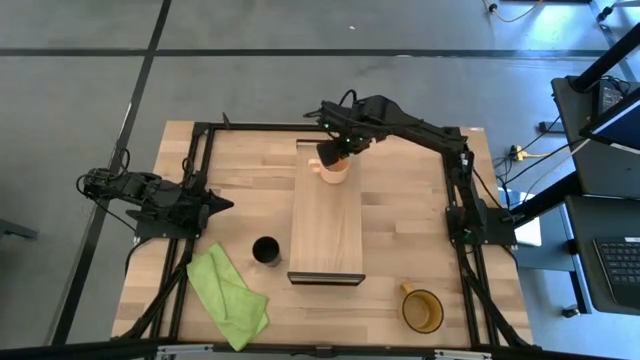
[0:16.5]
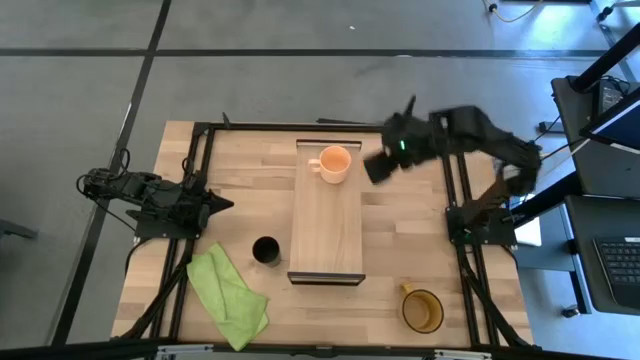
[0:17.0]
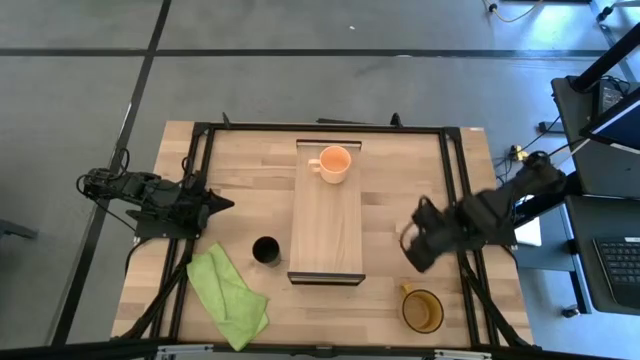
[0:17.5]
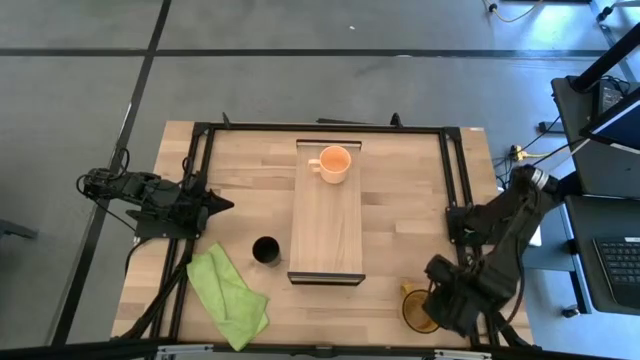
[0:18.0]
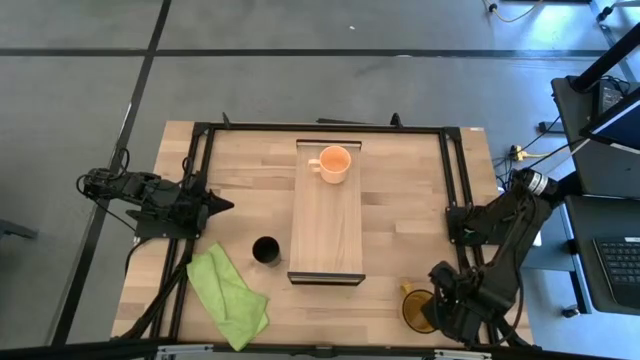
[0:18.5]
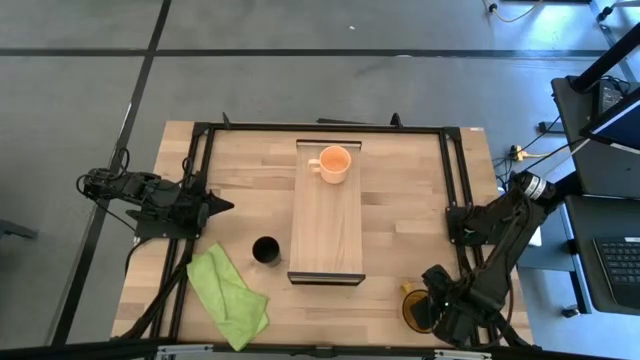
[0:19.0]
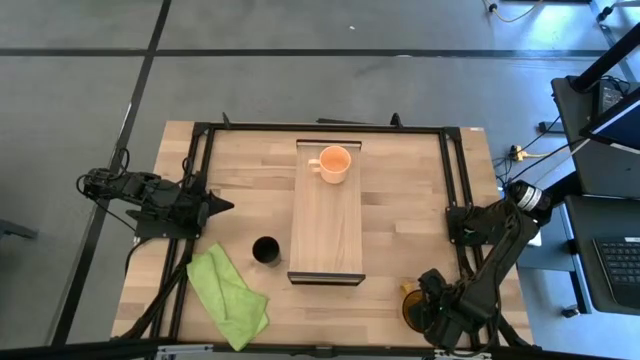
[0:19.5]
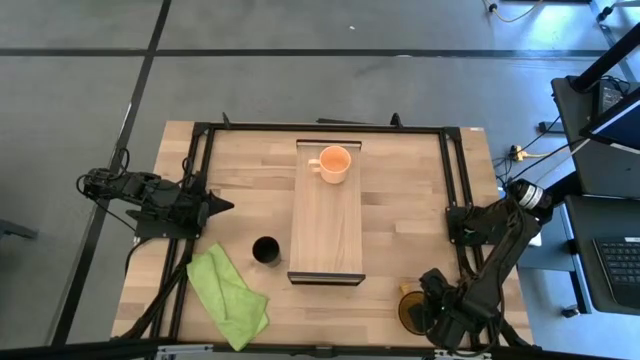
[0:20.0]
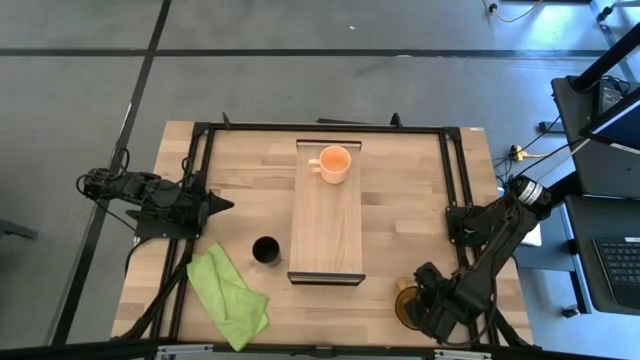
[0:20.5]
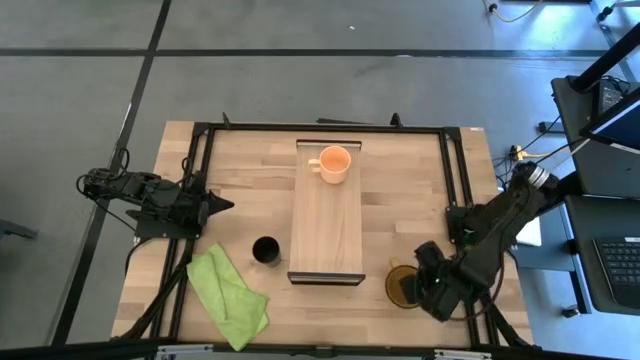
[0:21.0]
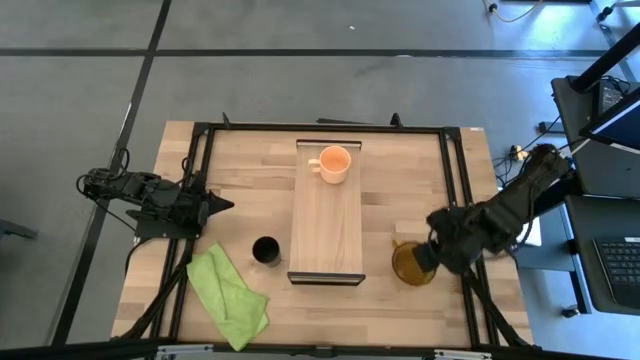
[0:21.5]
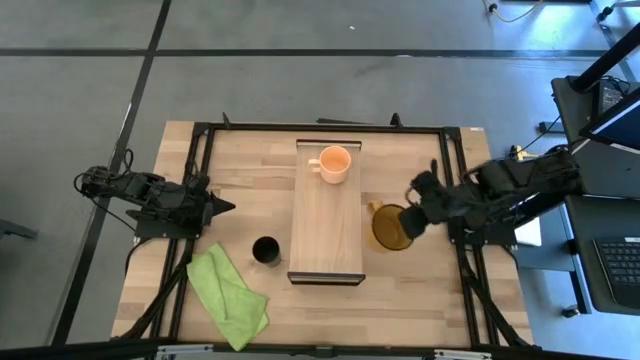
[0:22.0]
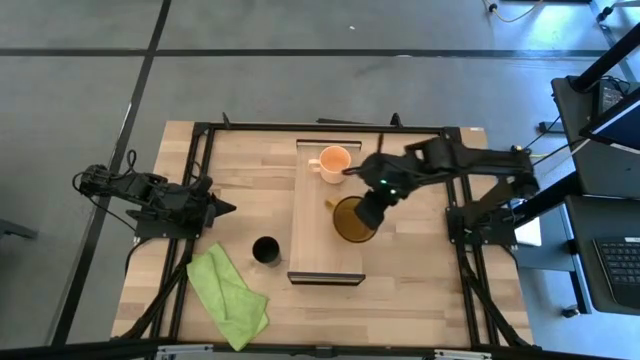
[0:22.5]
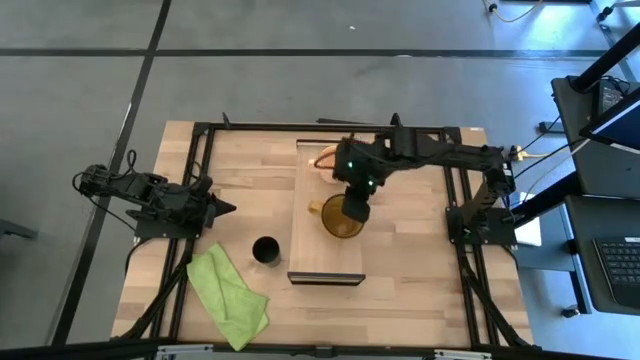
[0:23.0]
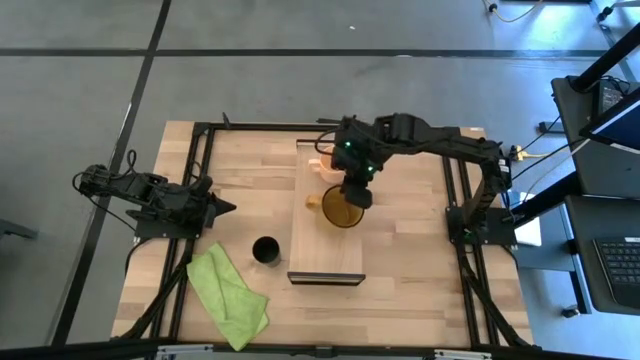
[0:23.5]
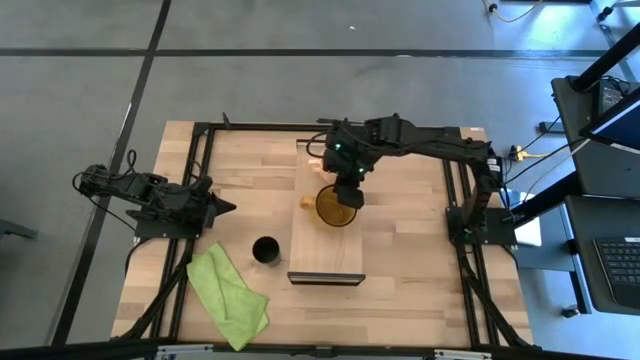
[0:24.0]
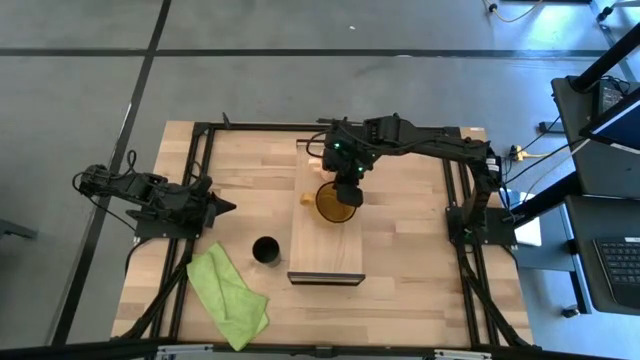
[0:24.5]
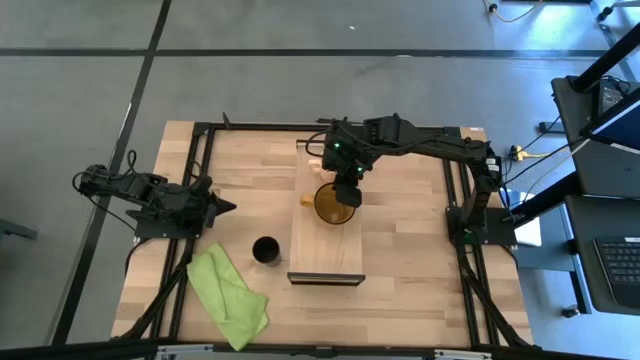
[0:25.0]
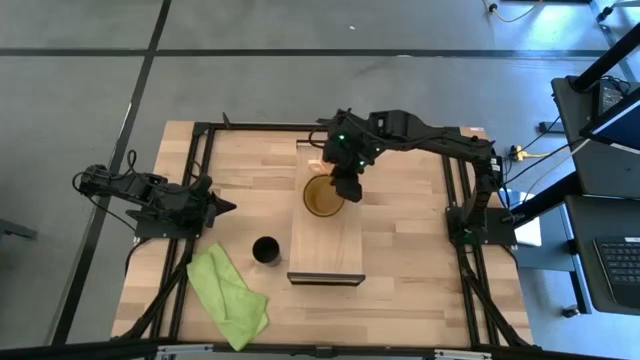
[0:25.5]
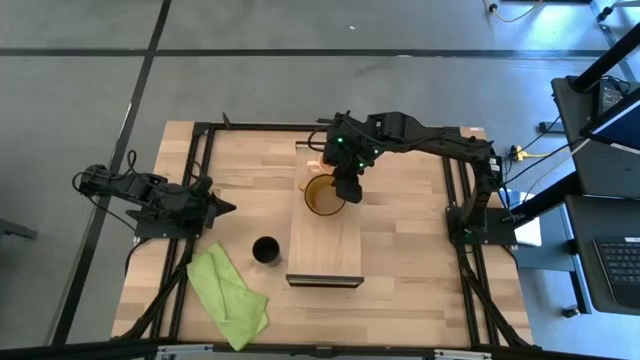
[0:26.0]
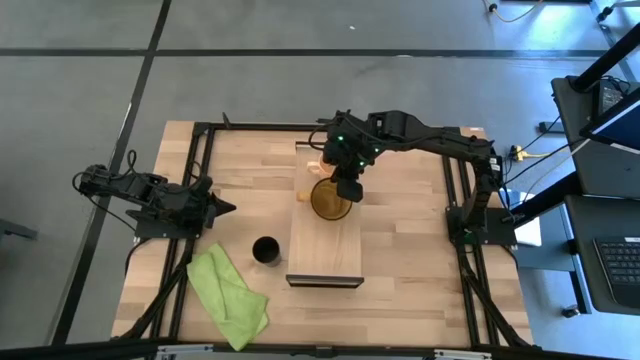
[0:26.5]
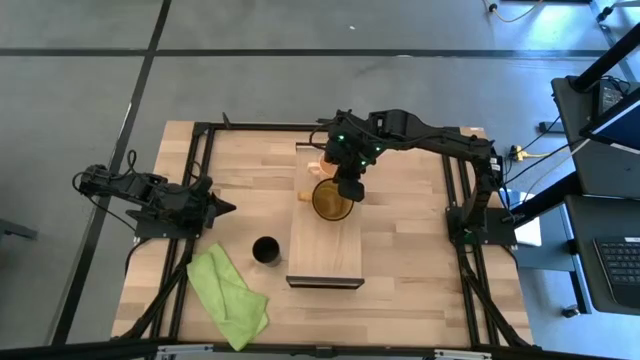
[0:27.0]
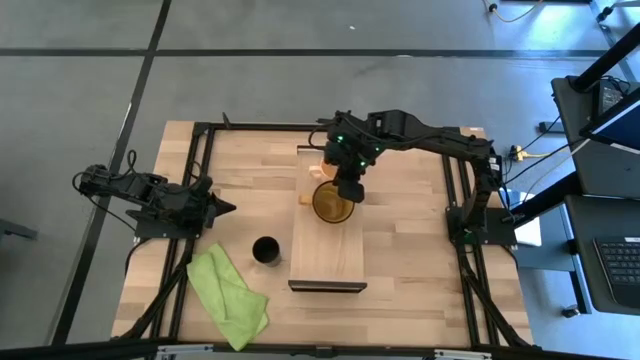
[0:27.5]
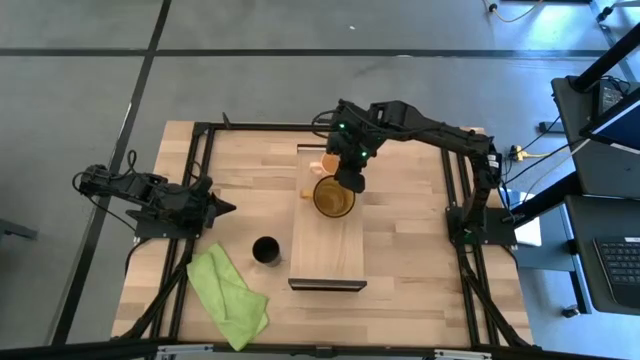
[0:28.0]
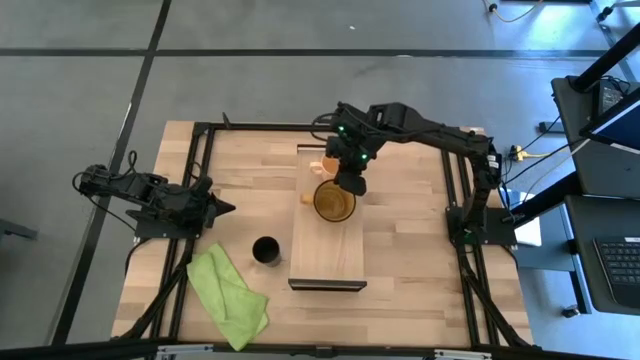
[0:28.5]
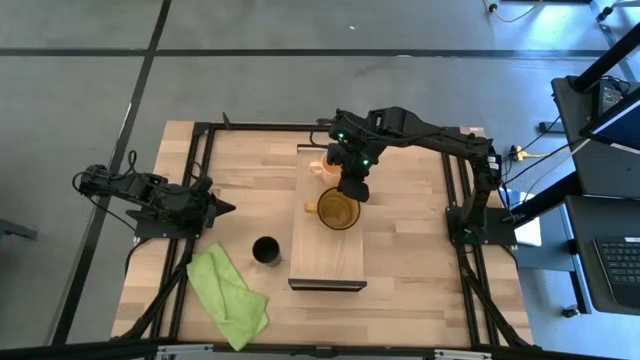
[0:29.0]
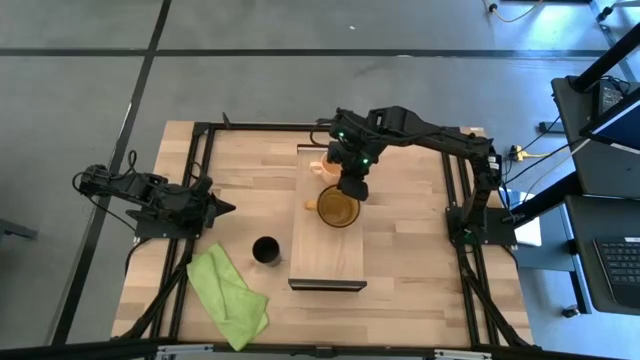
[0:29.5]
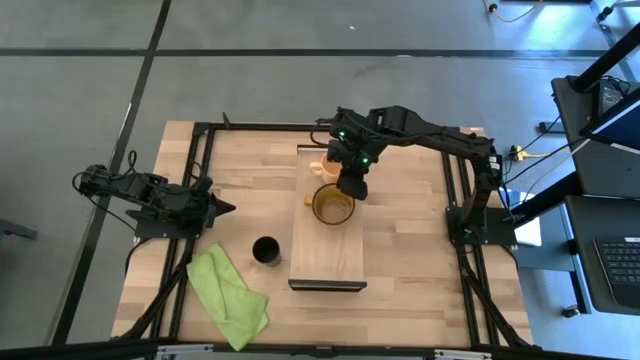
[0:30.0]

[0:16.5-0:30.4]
Task: Stack small to large cups/mugs on shelf
Put the orange cup on the shelf

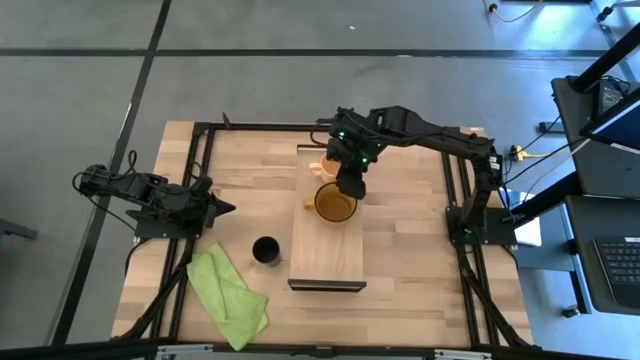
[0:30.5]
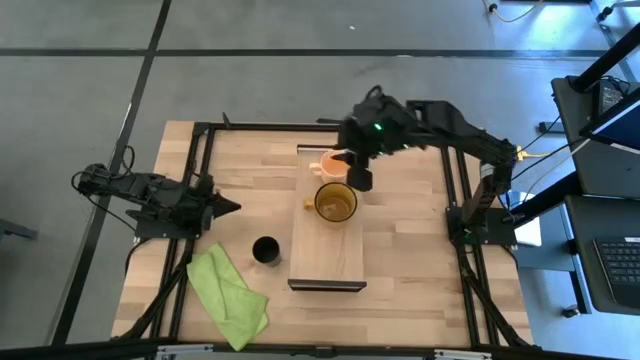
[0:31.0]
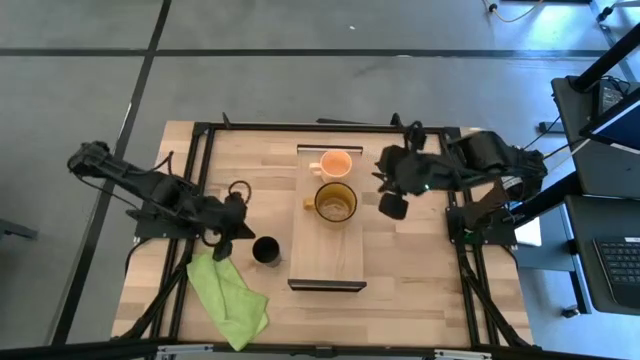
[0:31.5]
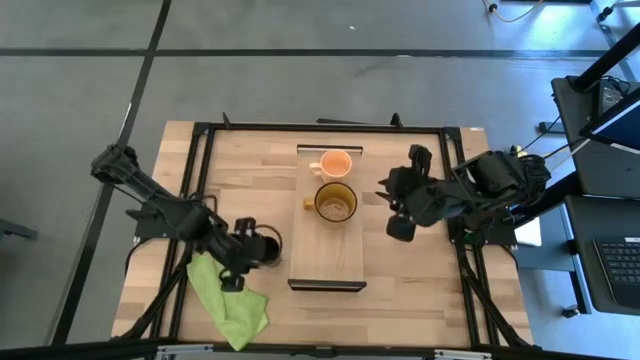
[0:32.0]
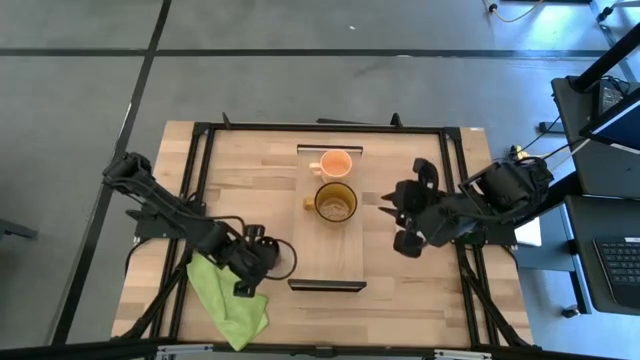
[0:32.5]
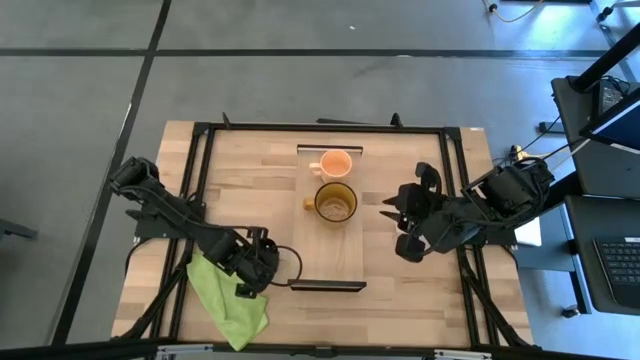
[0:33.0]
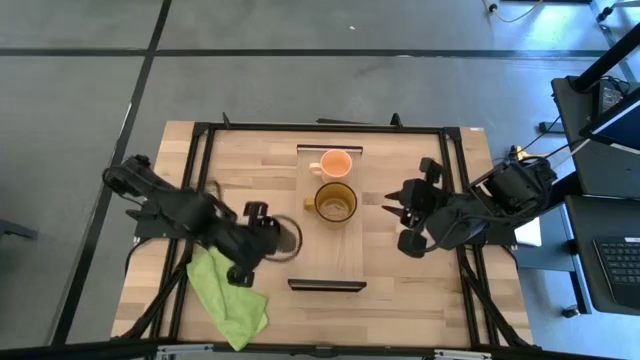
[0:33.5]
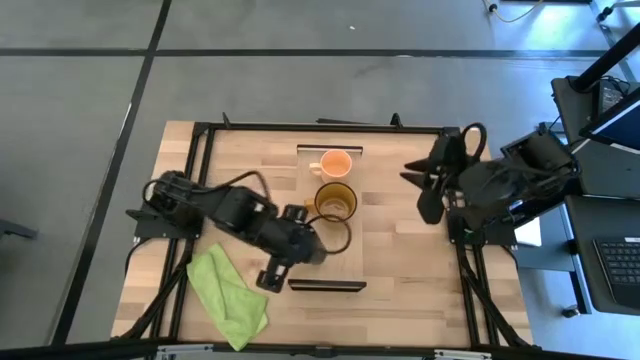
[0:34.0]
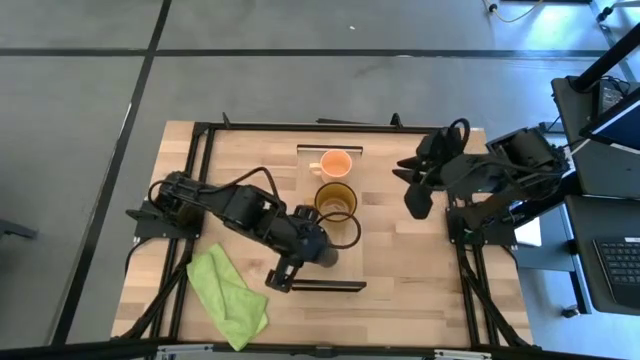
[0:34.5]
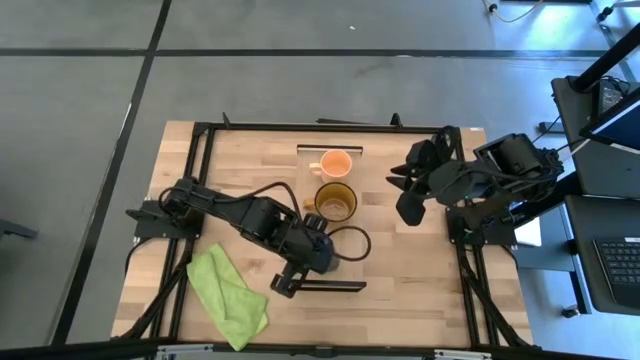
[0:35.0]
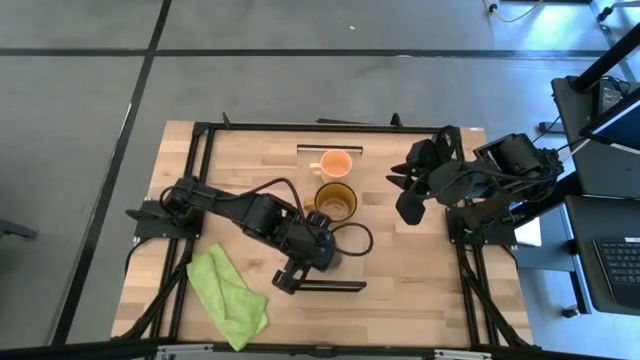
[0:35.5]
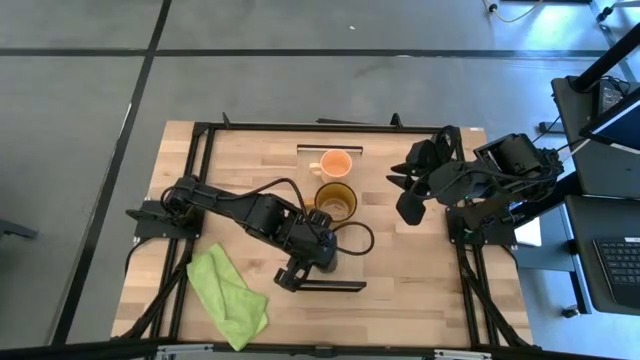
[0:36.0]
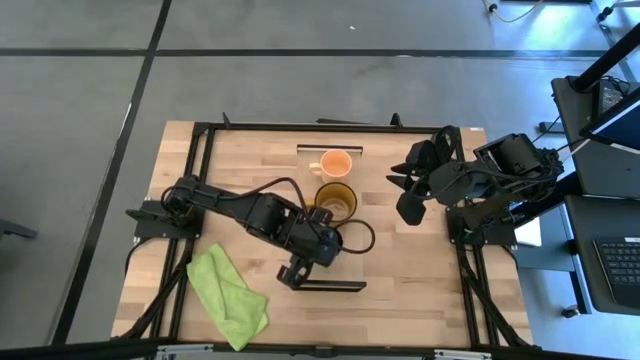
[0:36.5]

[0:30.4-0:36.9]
Put the black cup on the shelf

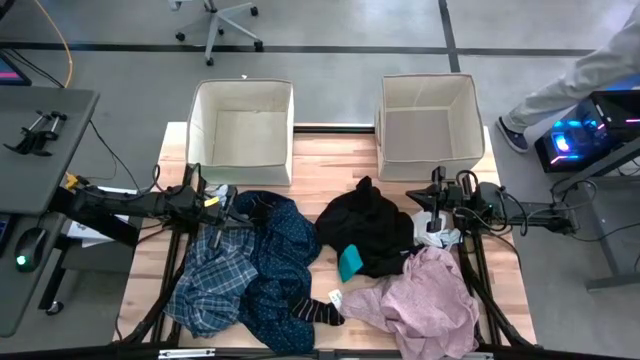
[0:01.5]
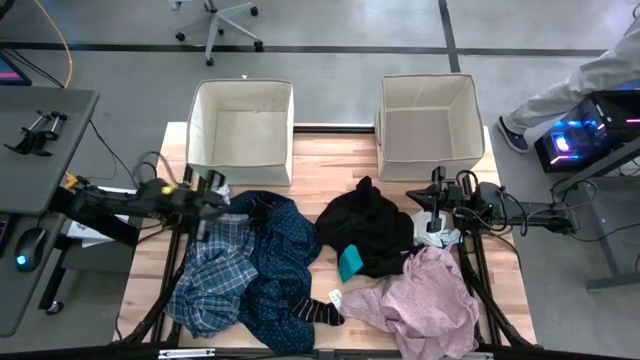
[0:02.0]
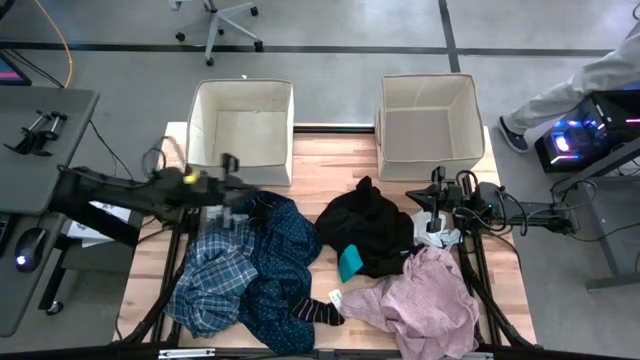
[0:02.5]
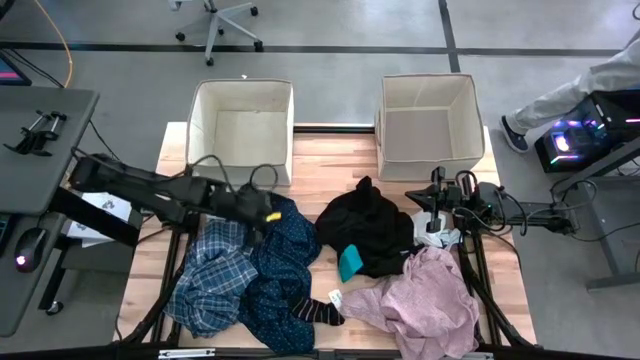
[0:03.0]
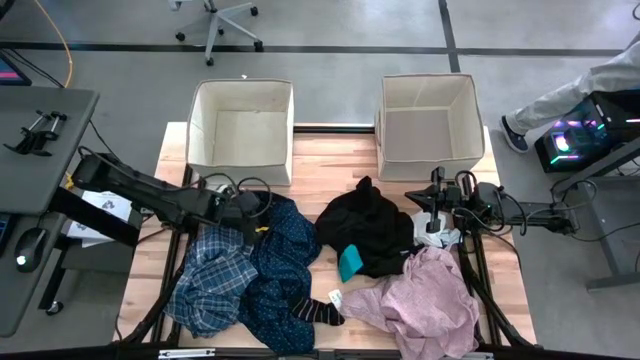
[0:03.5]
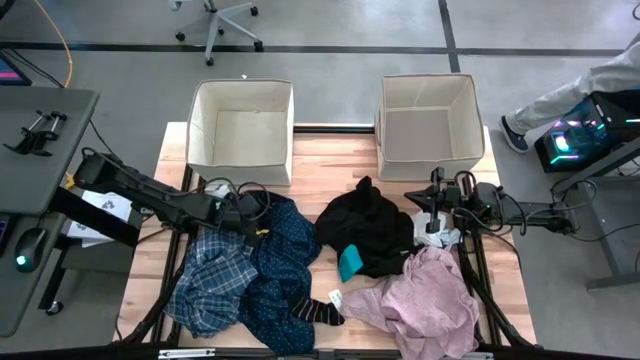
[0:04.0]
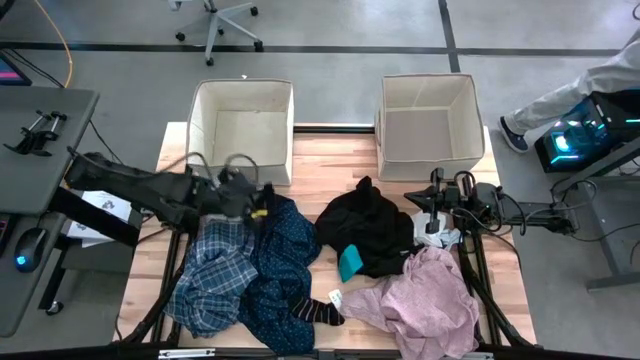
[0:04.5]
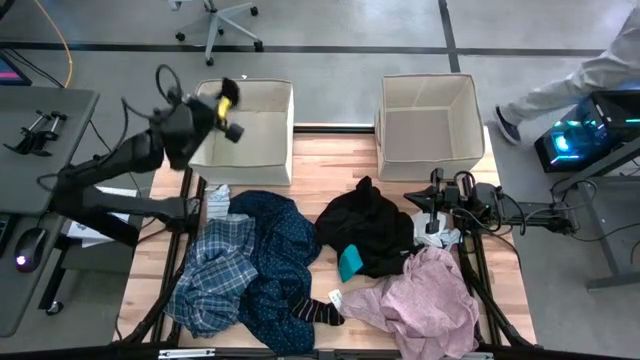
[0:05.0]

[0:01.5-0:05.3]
Task: Sort clothes
Put the top black sock into the left laundry bin
